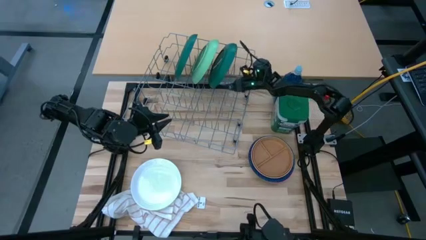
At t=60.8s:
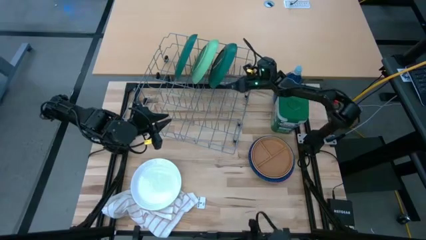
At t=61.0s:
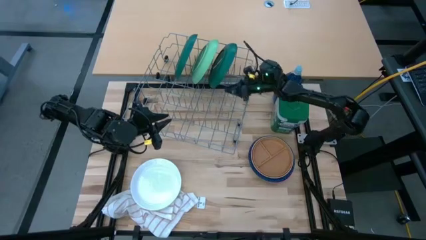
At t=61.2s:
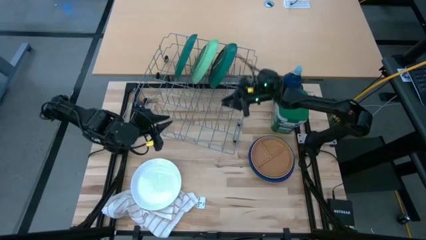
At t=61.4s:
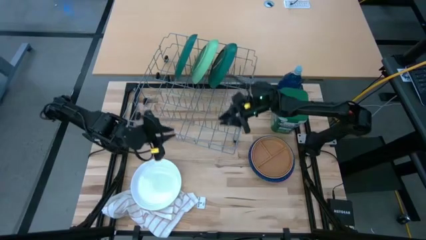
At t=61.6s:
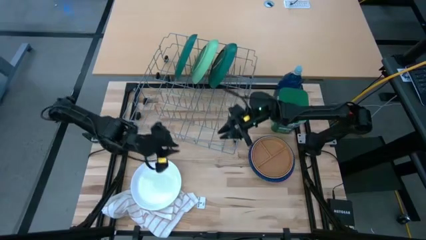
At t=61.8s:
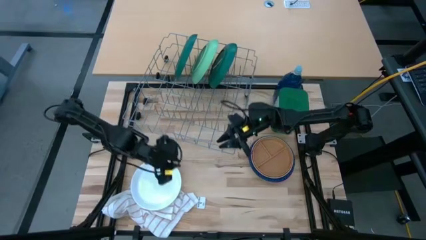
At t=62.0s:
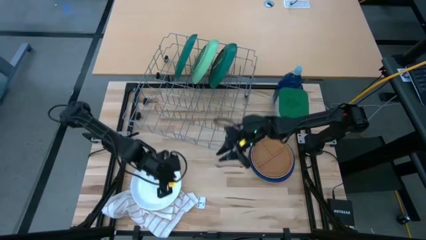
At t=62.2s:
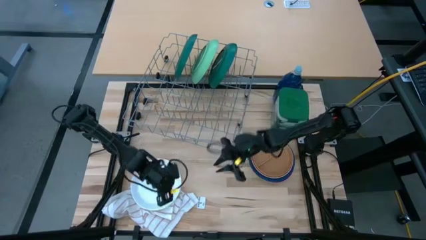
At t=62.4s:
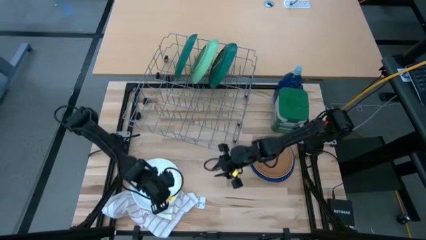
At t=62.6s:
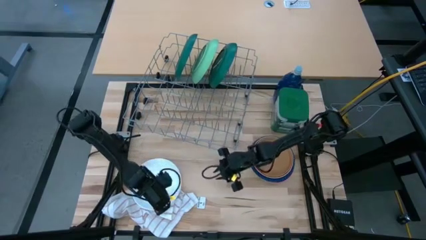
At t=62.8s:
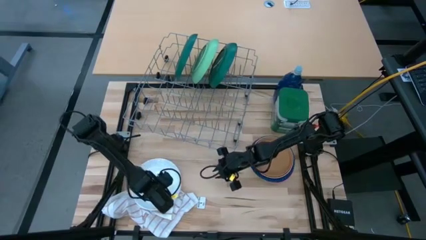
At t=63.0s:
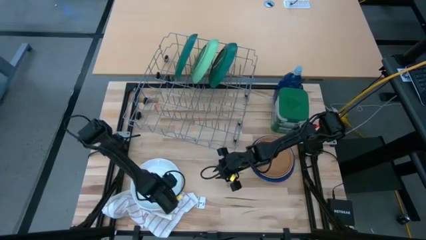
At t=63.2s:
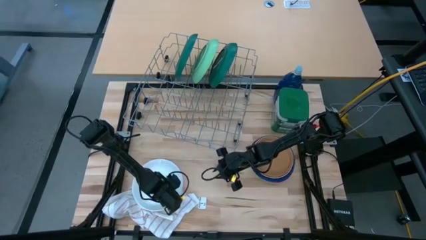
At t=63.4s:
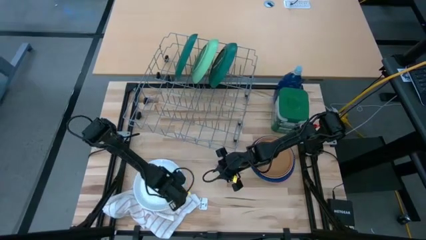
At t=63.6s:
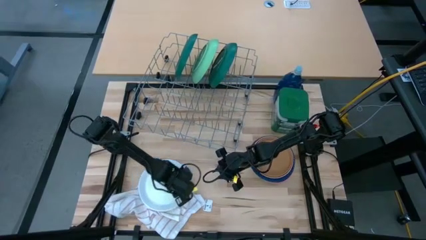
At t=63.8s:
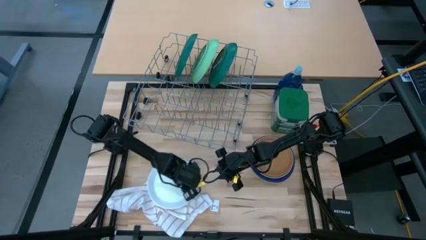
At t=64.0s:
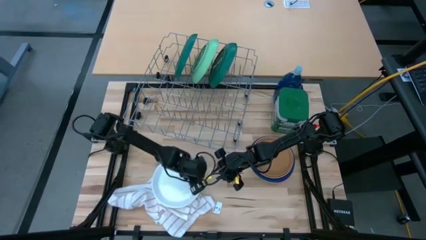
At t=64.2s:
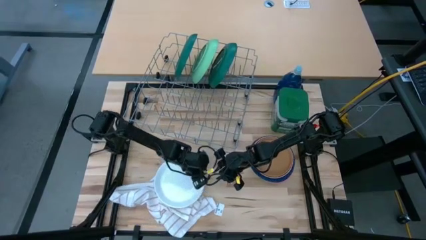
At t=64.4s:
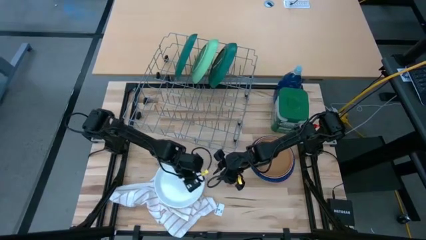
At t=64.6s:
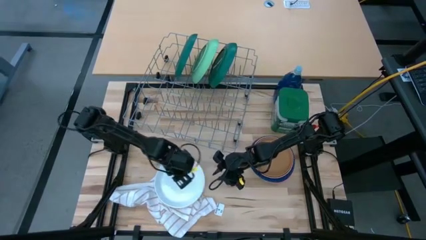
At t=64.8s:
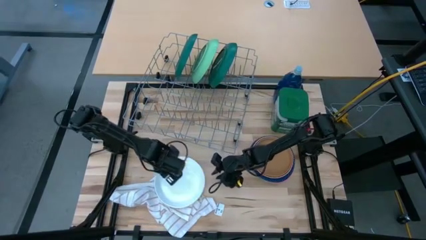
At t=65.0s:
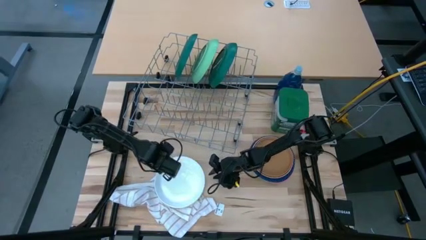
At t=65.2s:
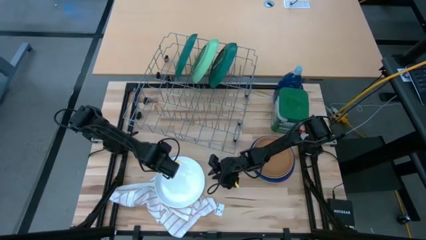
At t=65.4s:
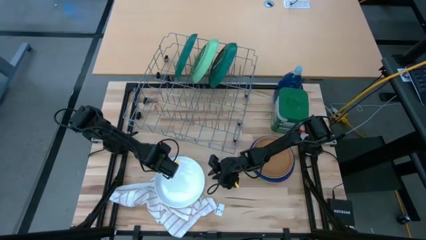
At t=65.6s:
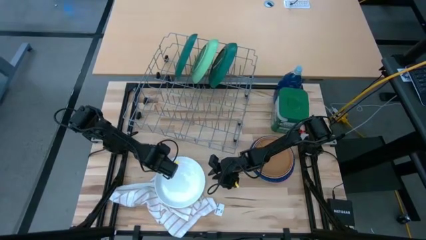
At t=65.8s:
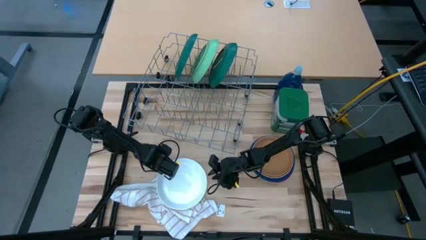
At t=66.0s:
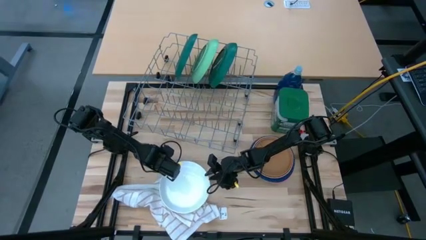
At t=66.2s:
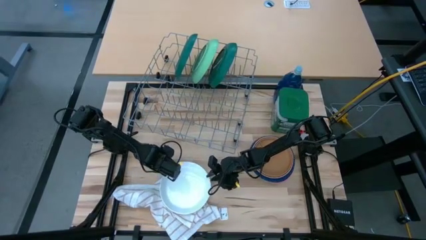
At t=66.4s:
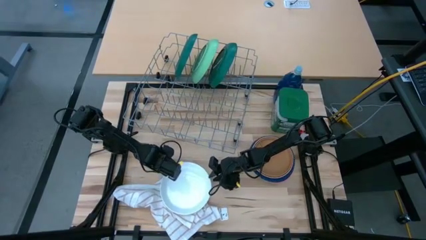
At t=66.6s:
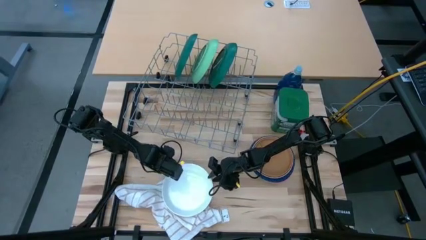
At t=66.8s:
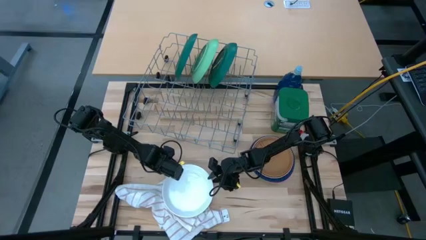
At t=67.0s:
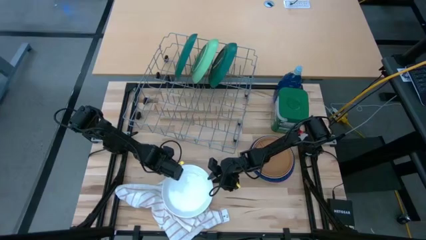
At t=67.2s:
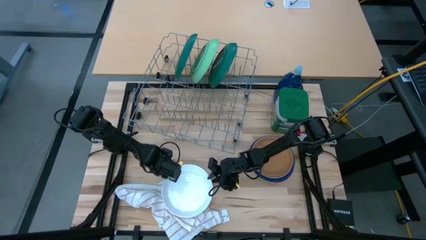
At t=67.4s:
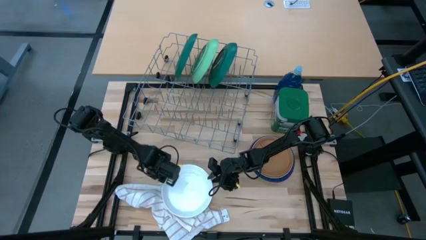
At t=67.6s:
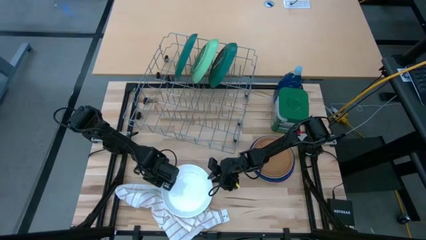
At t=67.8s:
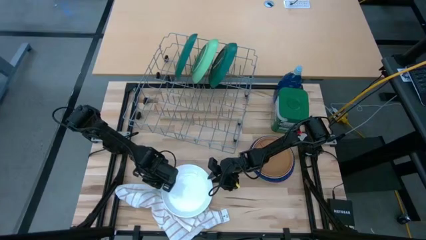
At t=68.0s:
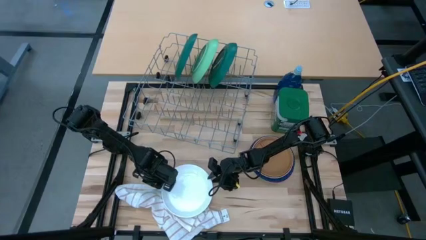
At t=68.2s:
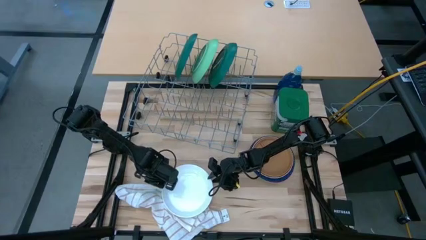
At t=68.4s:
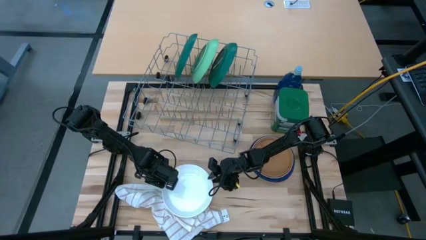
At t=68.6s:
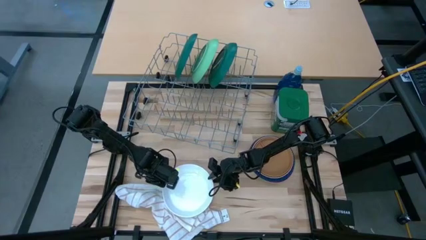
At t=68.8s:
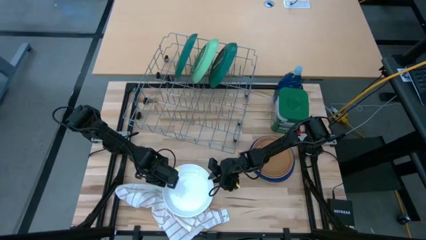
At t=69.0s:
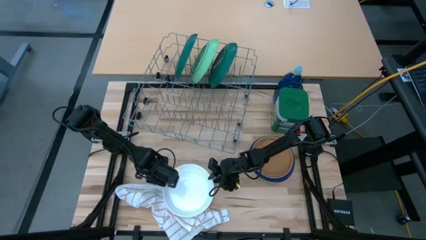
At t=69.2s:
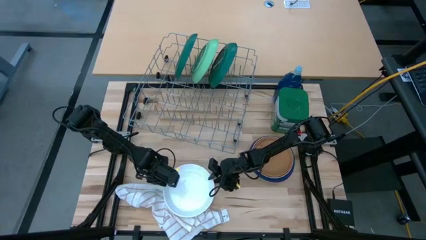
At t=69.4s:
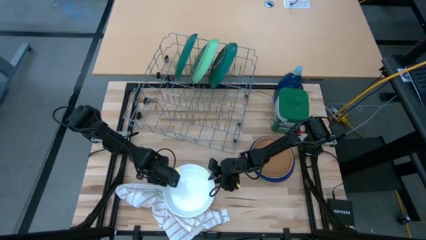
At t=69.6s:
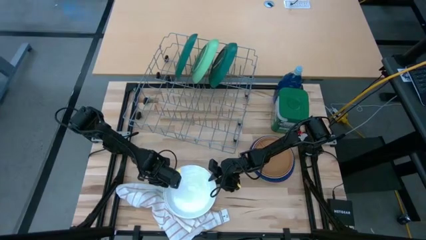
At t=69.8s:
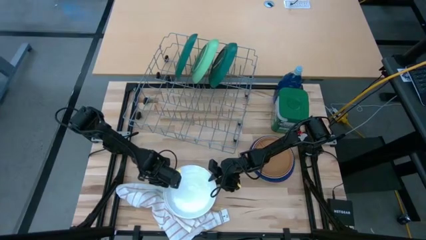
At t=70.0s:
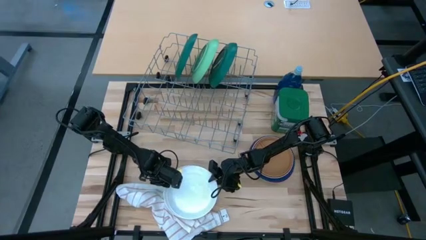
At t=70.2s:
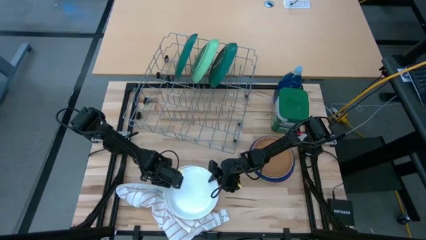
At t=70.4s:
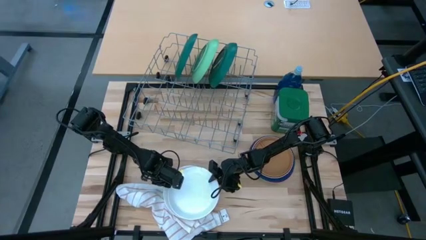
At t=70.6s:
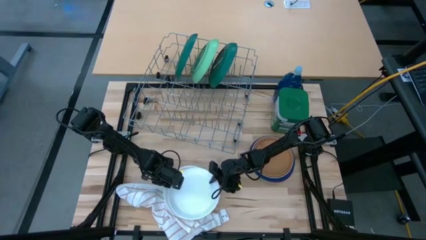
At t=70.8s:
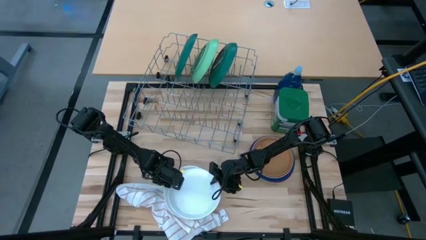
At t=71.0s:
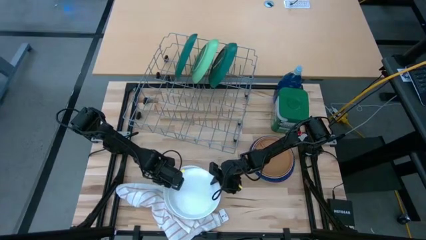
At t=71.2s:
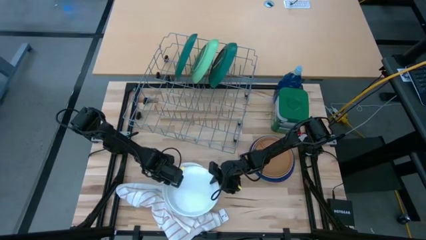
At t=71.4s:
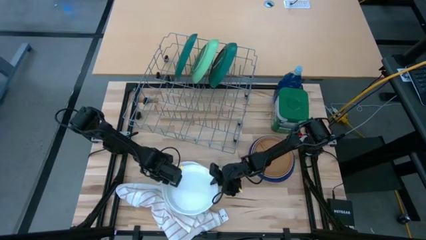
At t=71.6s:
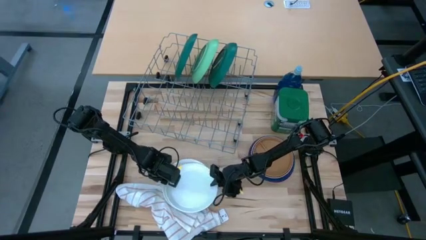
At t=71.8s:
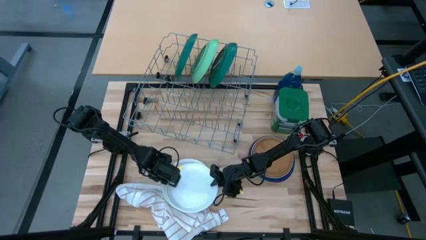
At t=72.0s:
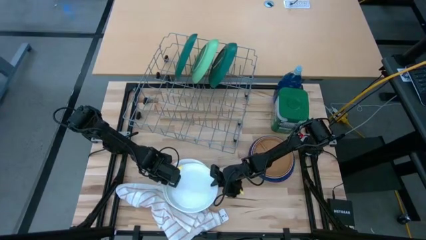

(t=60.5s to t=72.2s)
Task: Sort dishes
Put the white plate in the dish rack

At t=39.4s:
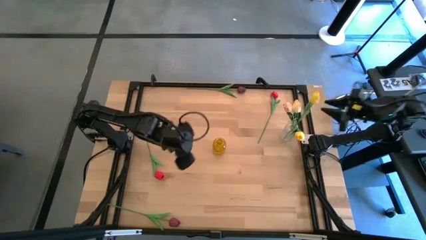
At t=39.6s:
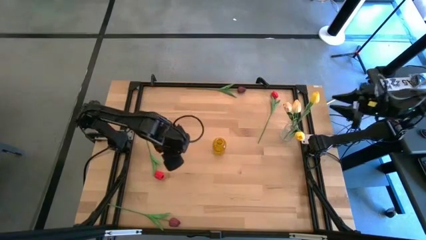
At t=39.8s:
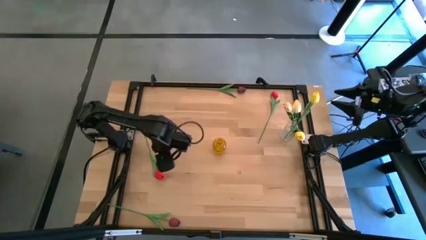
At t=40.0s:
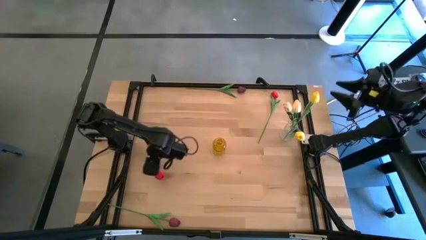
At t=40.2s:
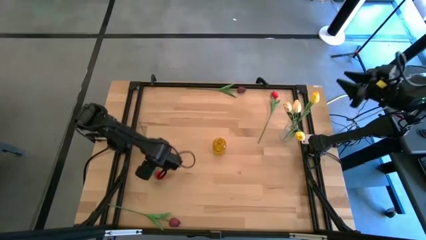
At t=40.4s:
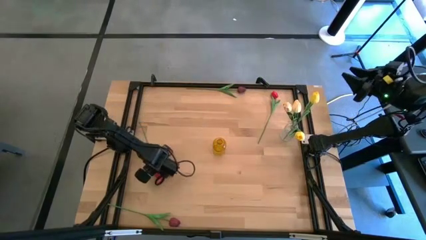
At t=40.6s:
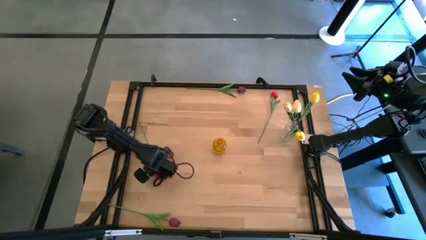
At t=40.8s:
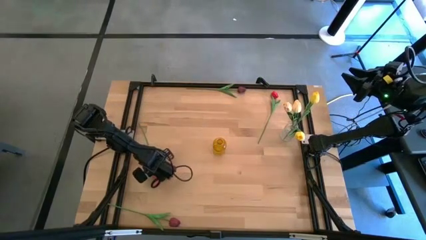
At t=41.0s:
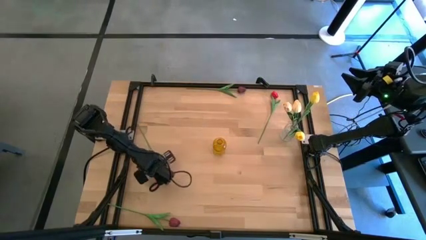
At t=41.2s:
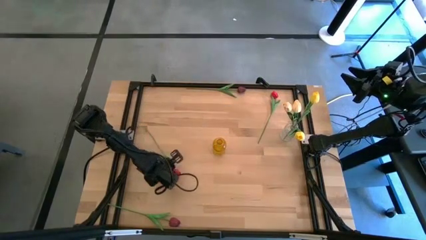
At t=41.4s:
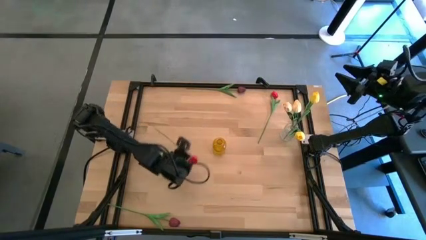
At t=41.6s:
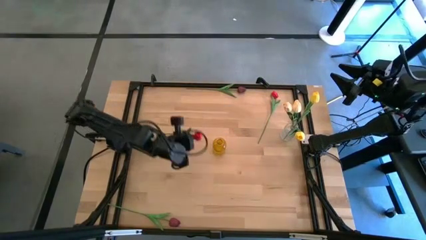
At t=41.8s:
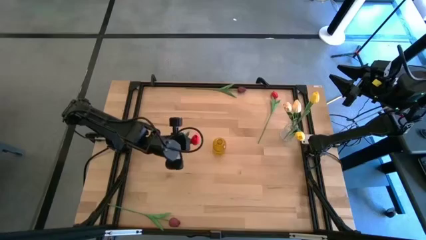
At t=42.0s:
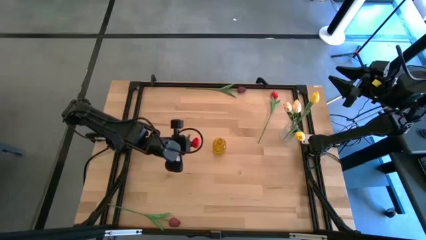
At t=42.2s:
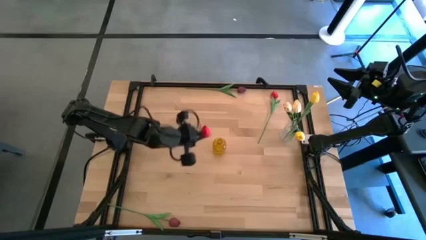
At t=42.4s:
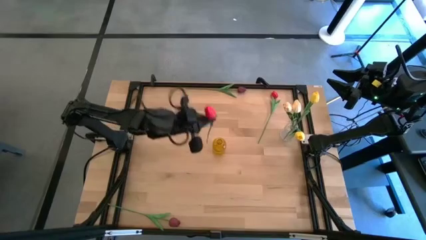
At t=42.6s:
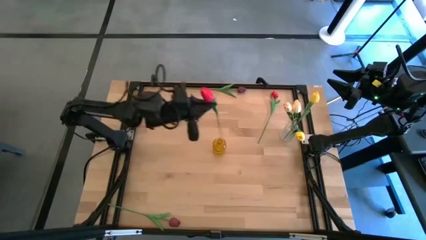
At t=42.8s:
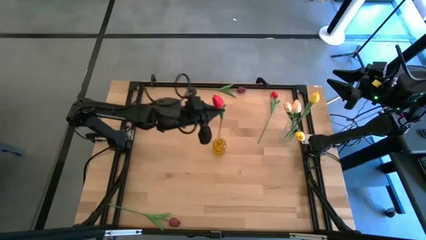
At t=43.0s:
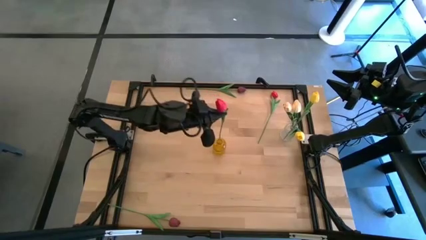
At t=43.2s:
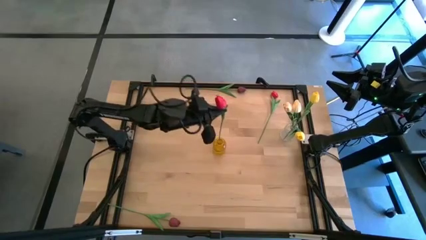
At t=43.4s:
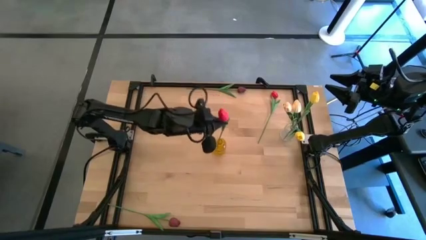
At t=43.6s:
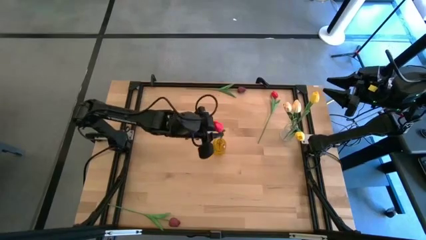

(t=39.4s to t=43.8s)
Task: Sort flowers into vase by color
Put the red tulip into the yellow transparent vase
